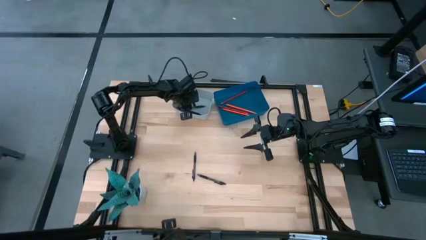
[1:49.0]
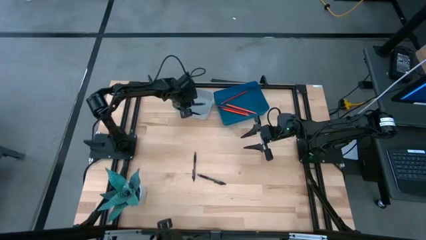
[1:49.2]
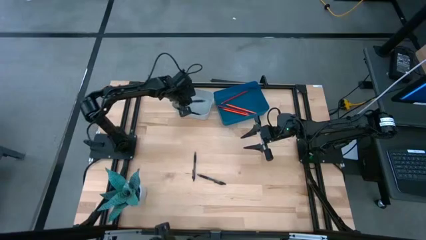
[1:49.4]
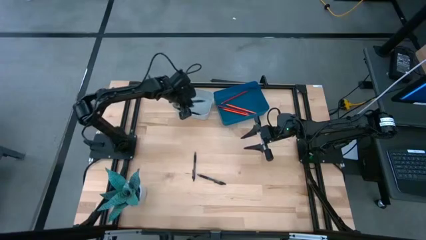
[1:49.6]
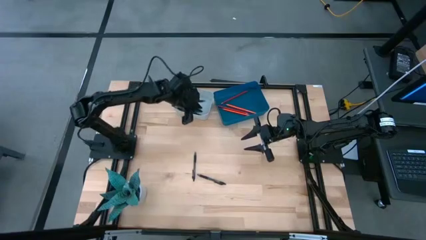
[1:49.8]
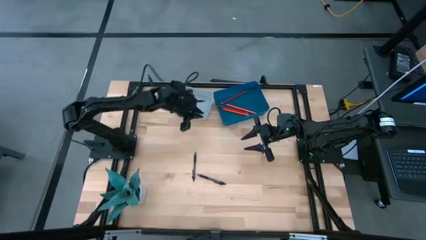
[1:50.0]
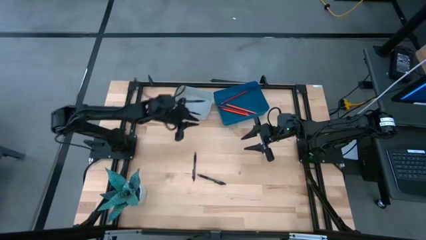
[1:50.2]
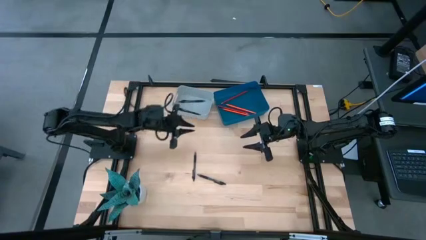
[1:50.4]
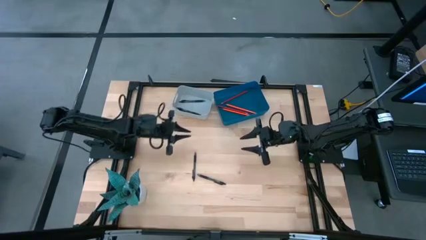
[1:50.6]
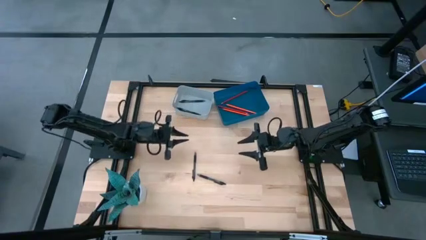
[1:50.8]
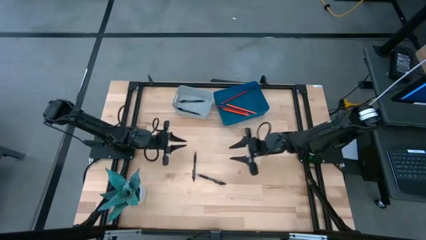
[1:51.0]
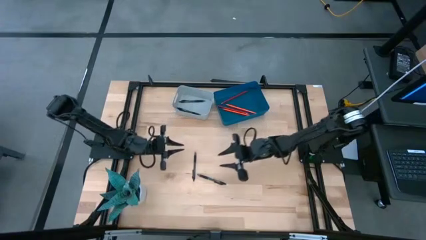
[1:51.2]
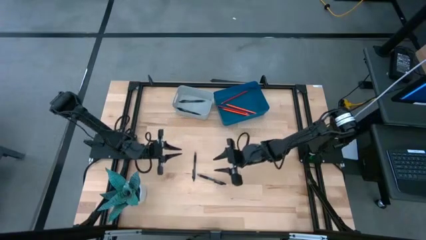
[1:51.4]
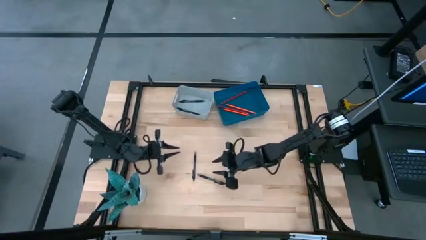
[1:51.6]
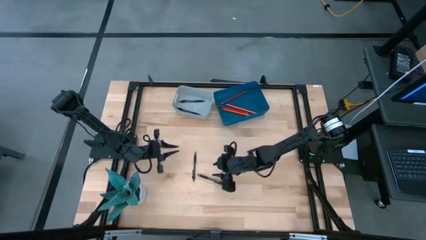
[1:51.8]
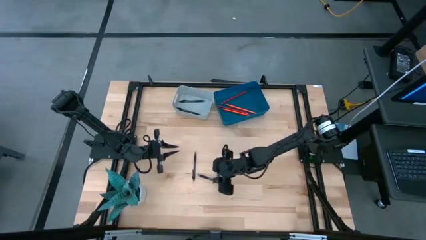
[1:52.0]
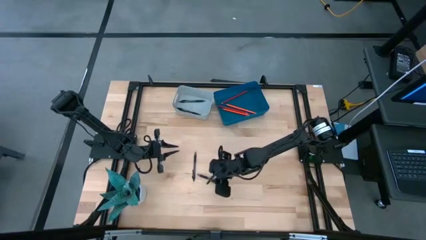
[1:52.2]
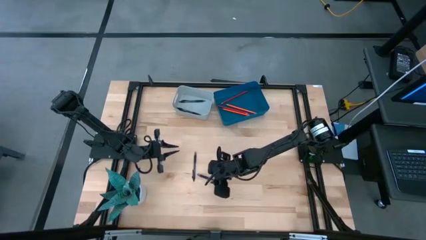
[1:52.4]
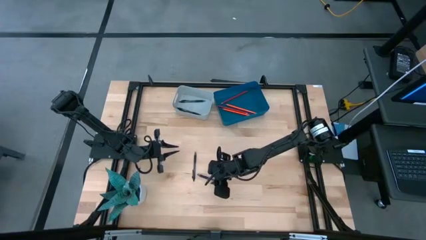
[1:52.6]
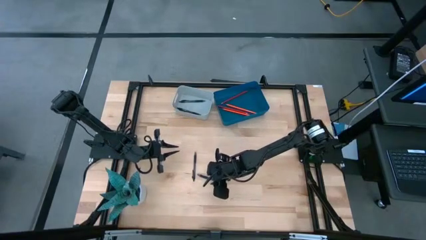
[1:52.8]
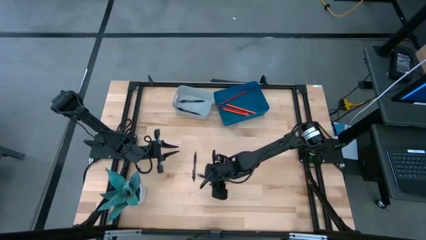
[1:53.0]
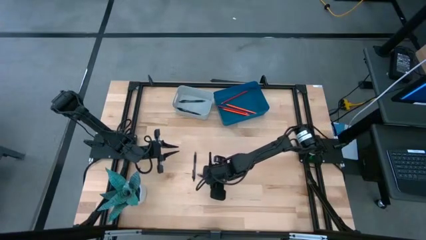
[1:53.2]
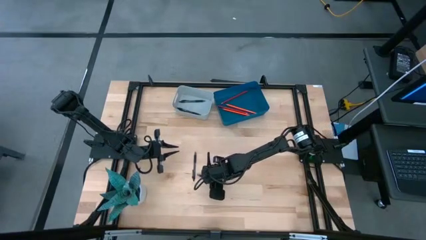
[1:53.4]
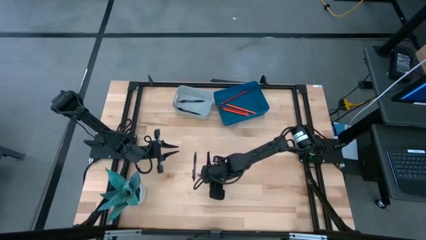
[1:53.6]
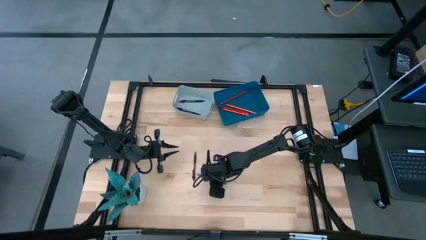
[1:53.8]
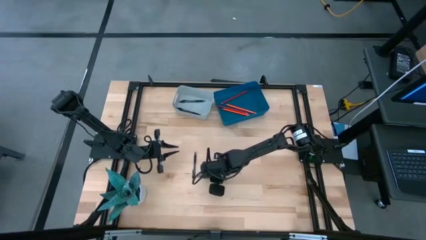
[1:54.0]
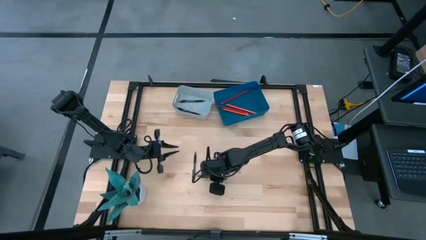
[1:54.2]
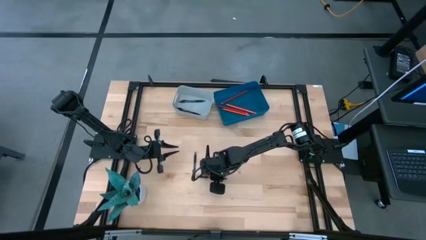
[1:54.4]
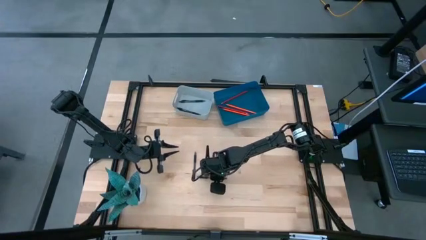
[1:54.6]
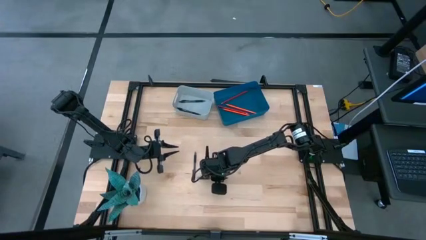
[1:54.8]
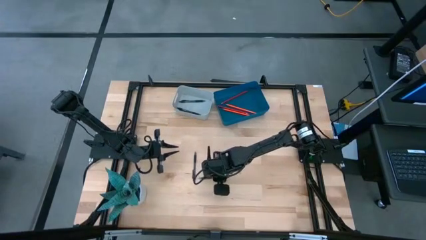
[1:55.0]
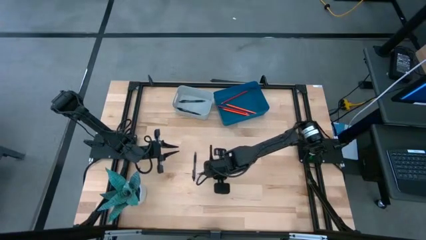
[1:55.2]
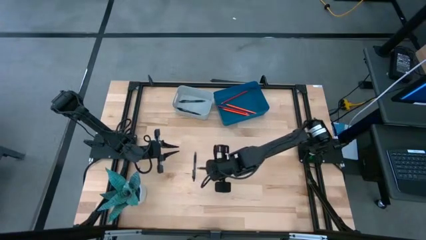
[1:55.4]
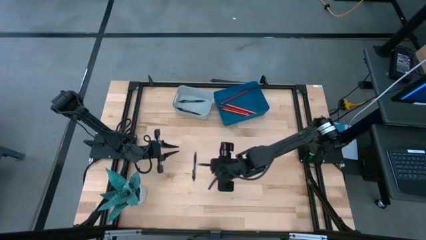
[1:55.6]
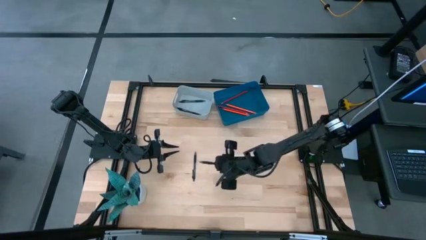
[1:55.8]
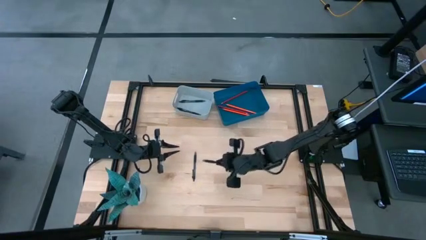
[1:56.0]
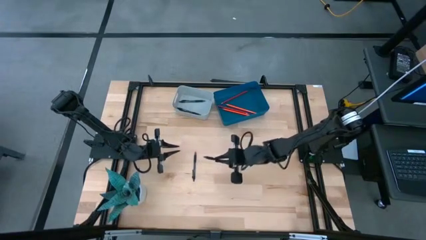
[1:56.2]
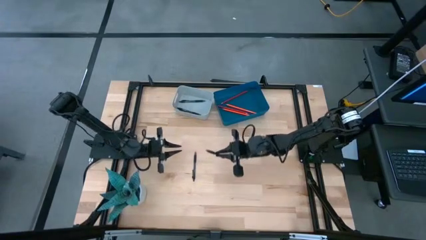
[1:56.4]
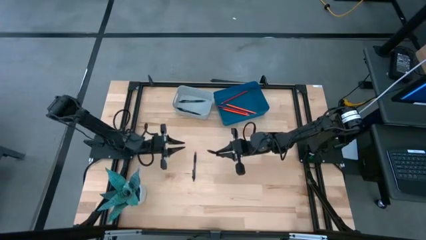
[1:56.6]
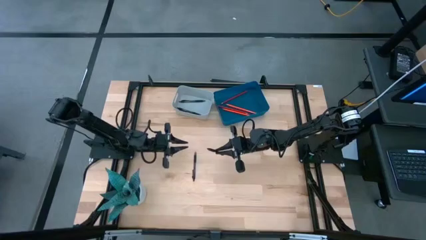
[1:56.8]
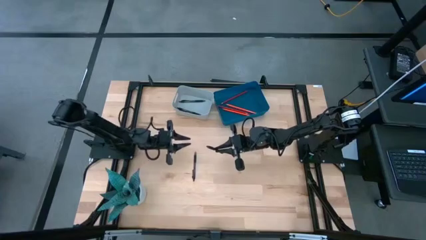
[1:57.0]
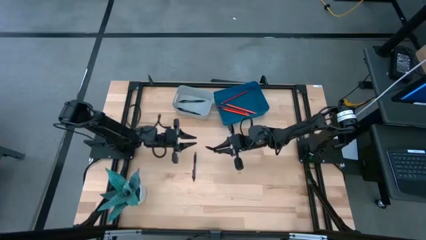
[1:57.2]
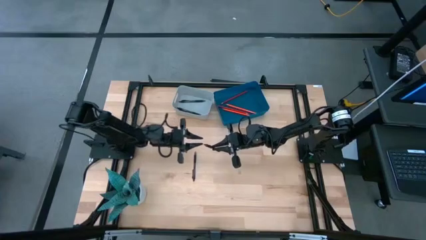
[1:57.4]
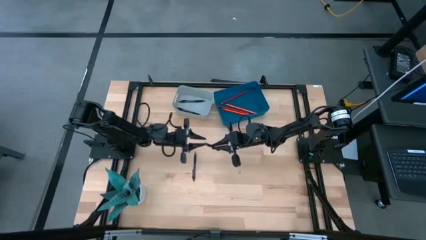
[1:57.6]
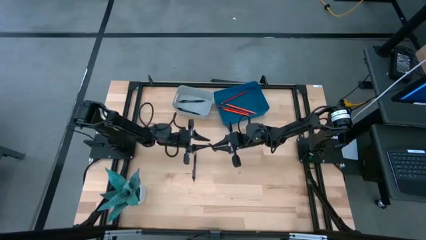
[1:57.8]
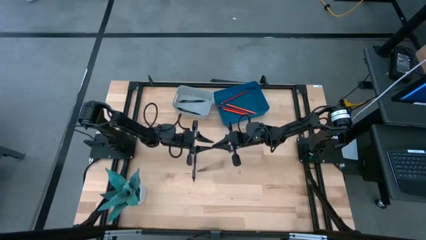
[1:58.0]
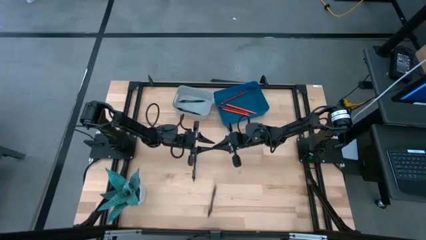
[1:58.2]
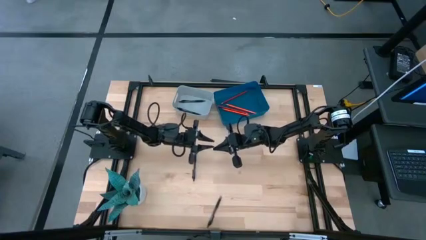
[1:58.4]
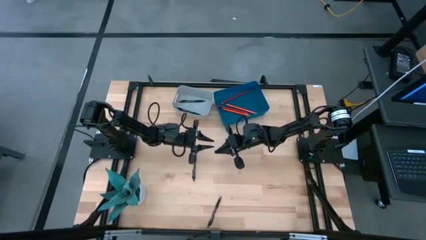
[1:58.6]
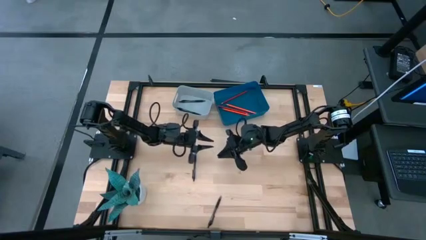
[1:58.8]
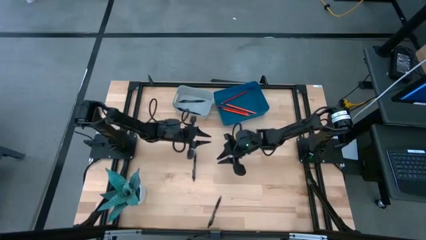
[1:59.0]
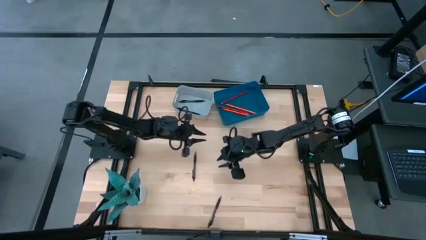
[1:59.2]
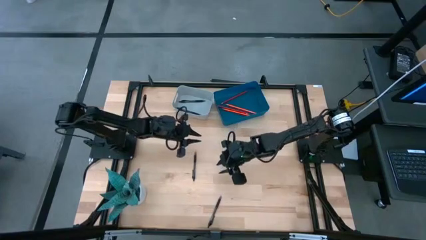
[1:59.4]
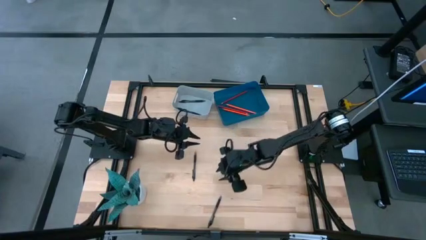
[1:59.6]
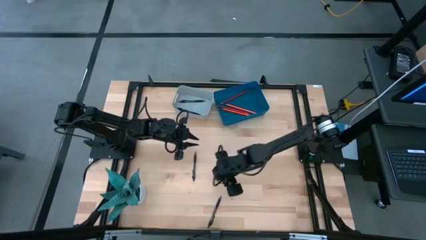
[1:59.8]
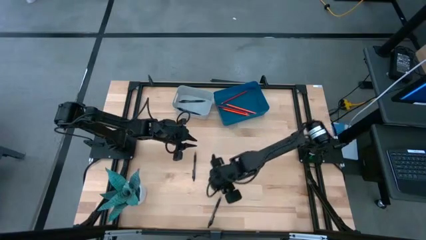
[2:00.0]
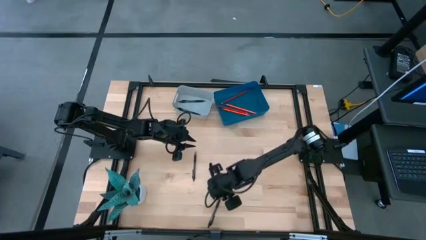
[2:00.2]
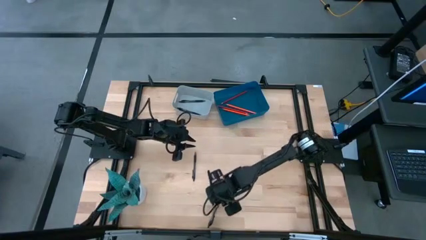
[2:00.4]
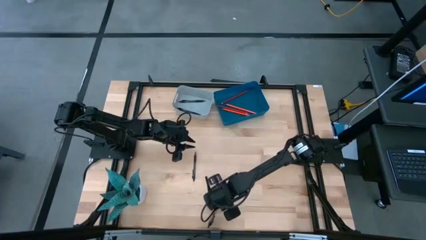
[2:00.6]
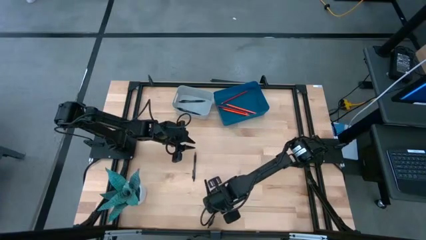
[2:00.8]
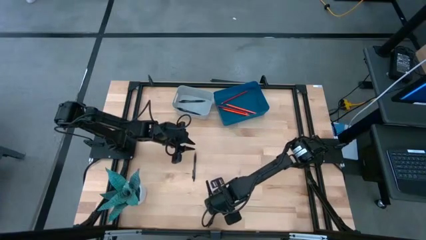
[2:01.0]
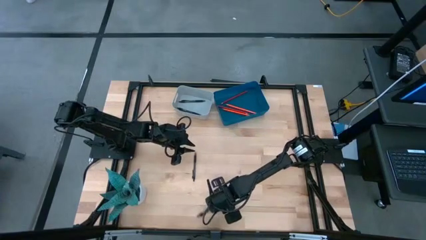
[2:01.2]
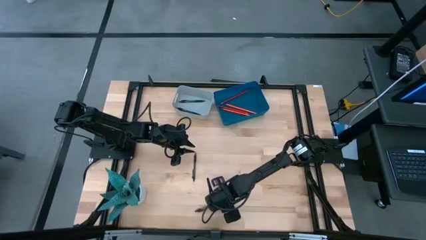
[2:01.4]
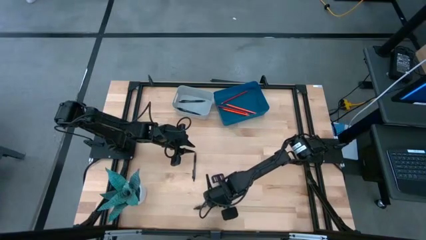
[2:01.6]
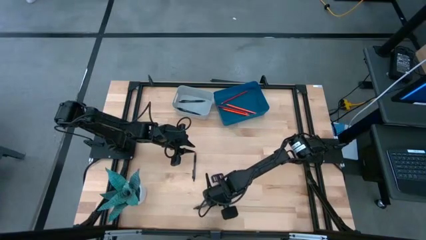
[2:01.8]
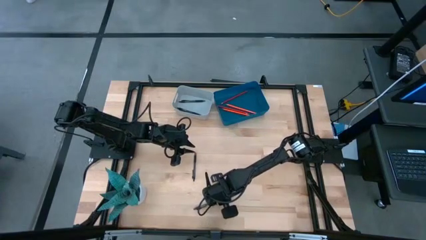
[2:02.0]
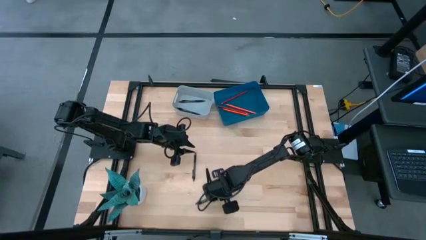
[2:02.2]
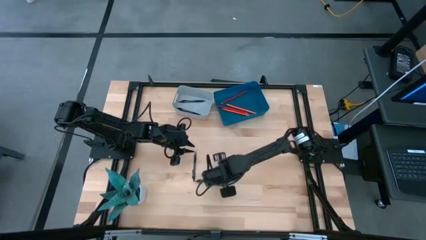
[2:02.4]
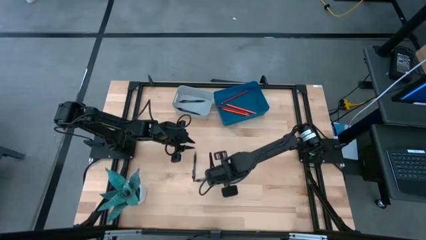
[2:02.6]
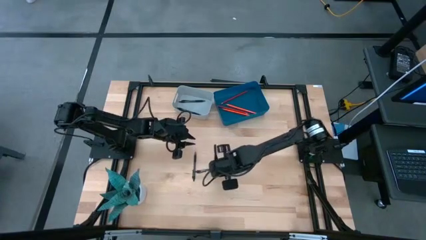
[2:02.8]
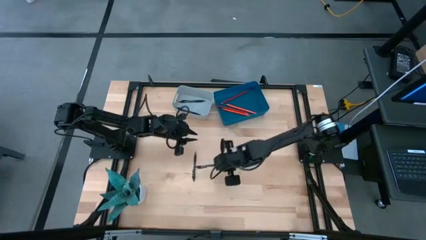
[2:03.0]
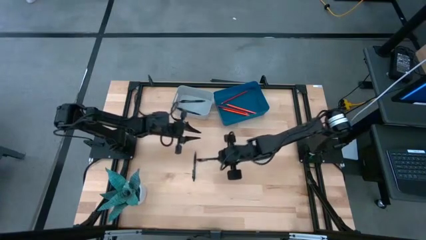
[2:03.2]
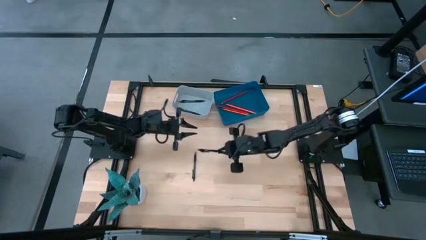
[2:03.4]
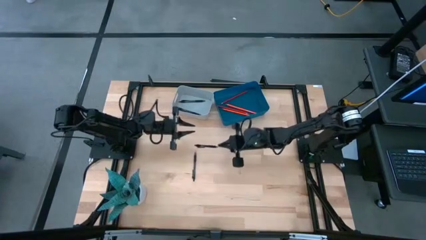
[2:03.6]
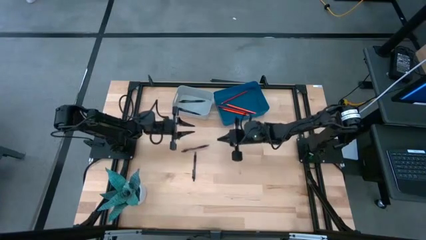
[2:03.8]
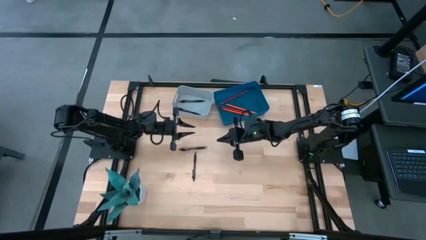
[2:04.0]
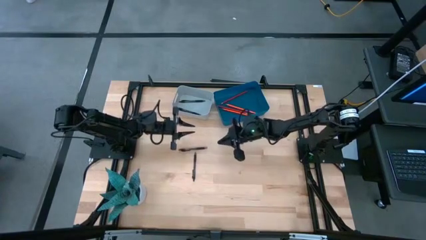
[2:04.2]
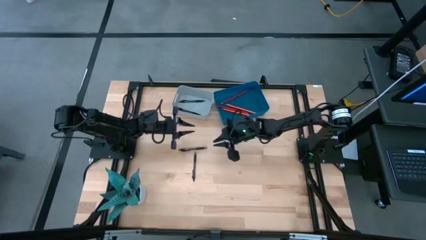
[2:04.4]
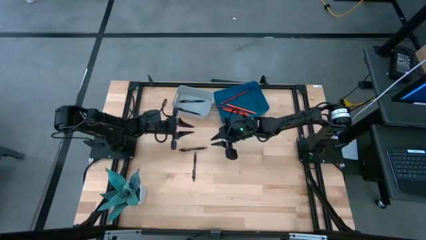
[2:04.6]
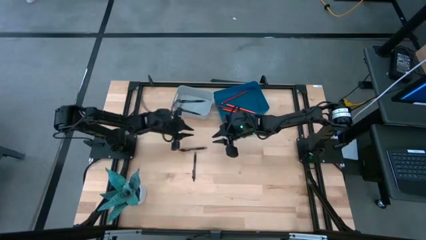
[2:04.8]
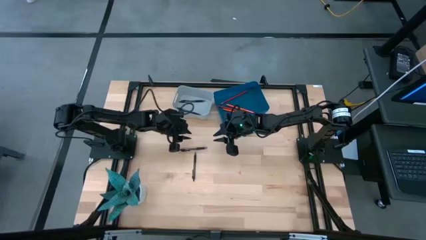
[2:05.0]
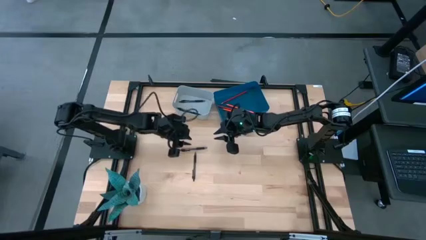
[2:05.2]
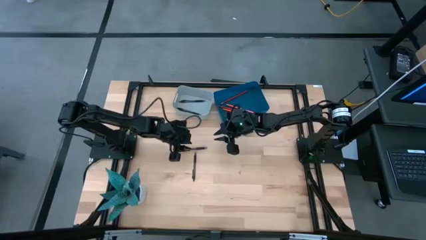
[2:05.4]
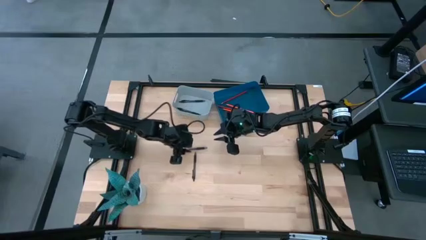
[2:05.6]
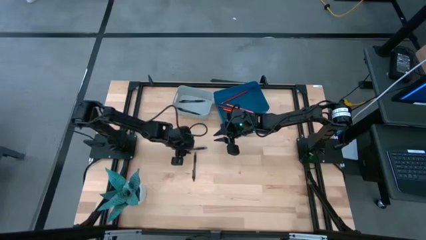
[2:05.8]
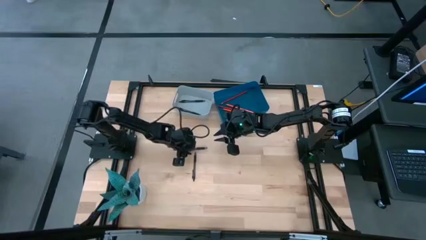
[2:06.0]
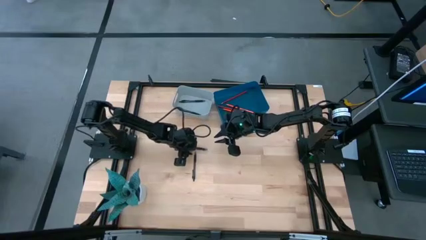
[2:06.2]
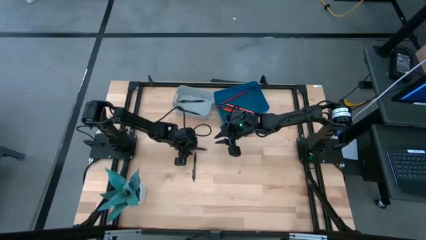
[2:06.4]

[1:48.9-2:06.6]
Task: Sort pens & pencils
Put the black pen into the gray bin
